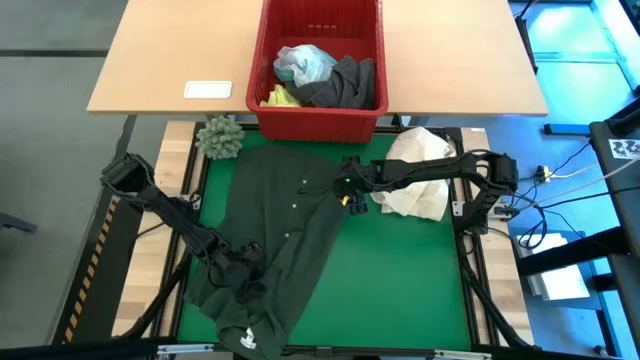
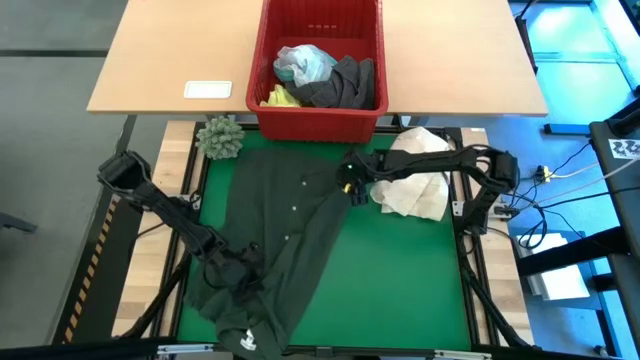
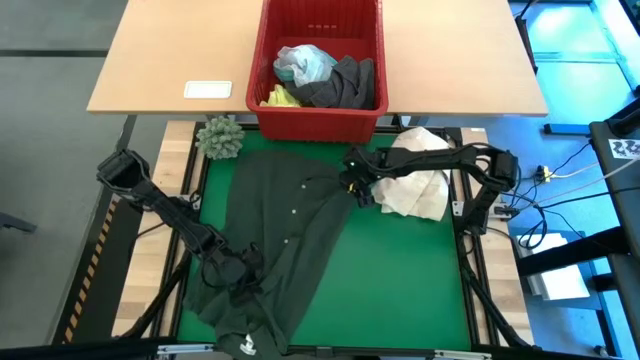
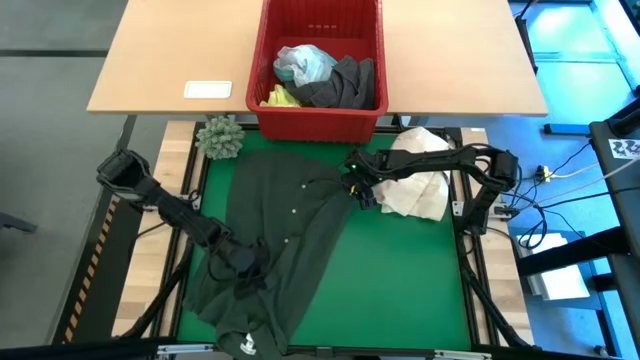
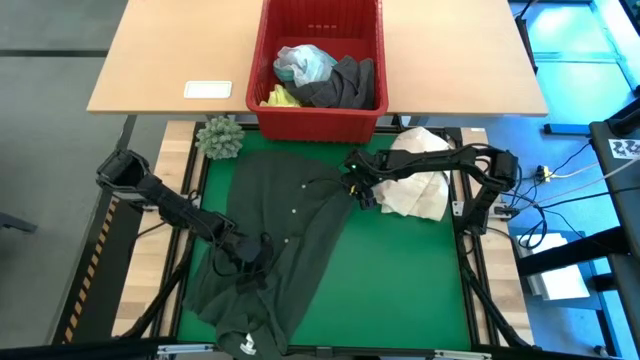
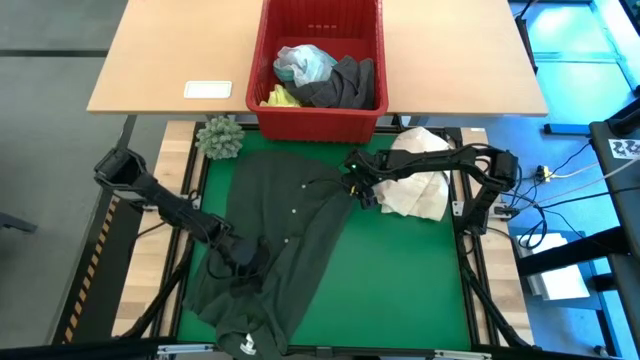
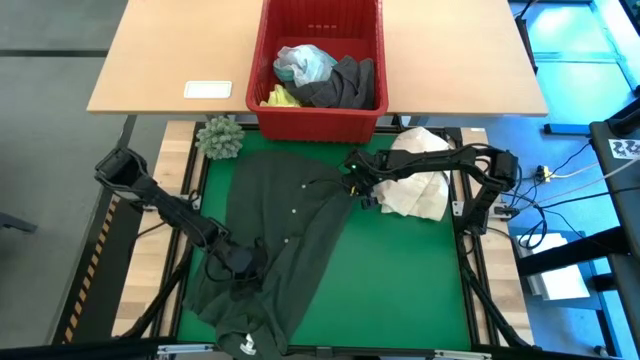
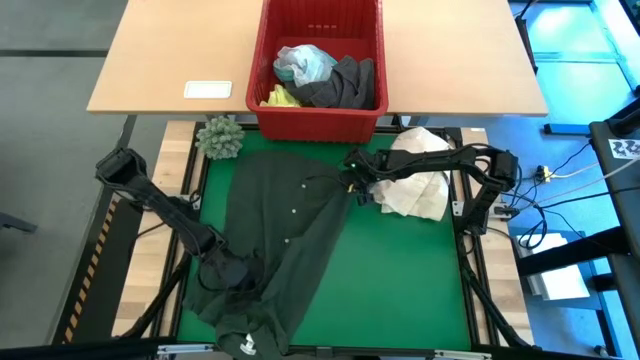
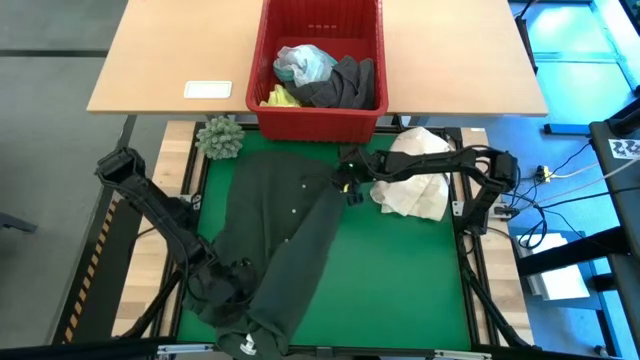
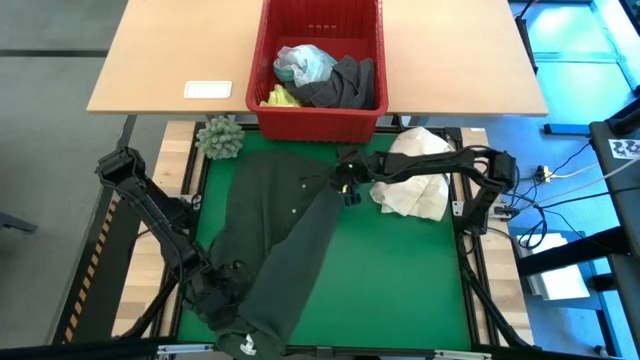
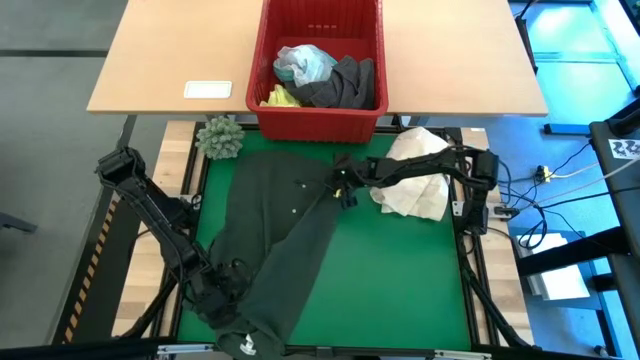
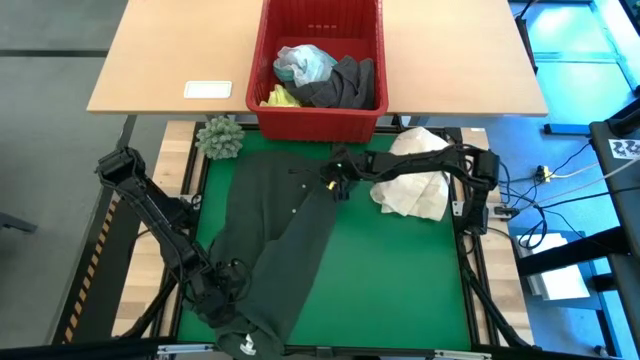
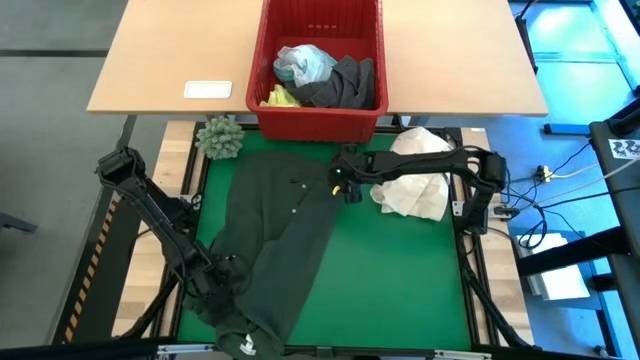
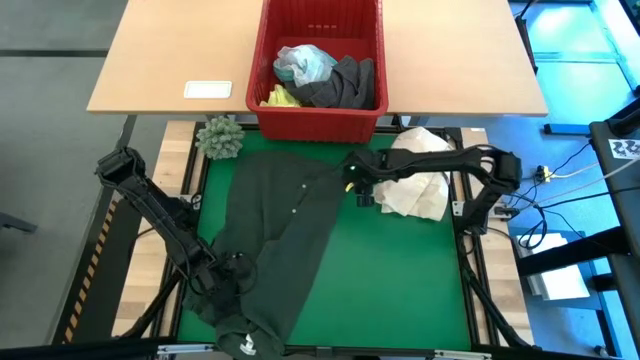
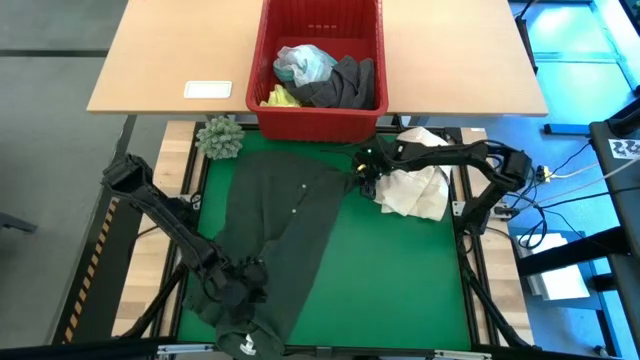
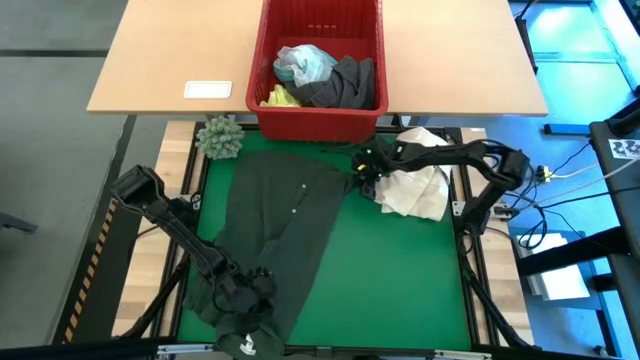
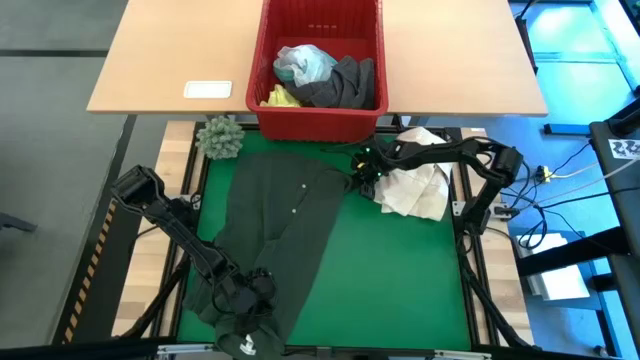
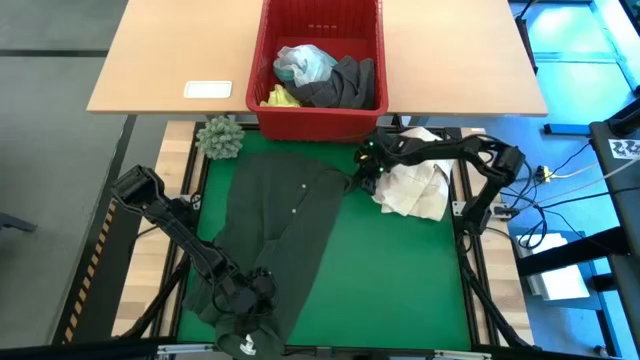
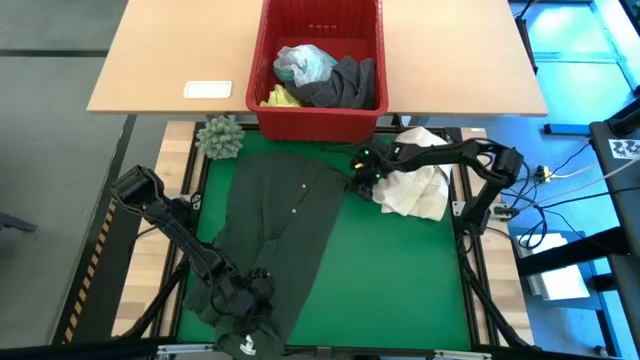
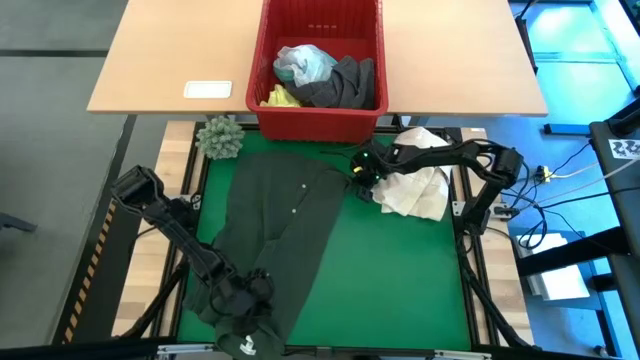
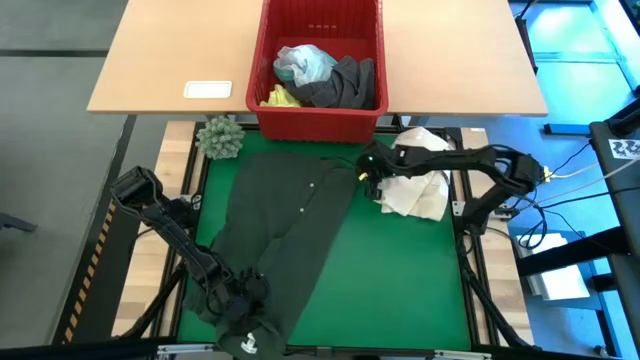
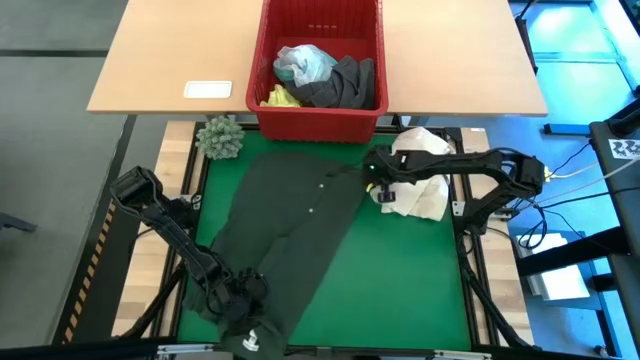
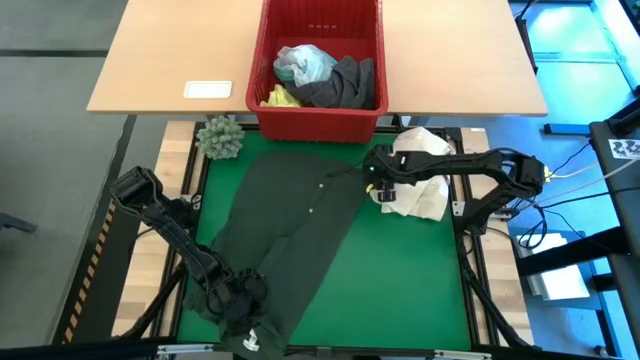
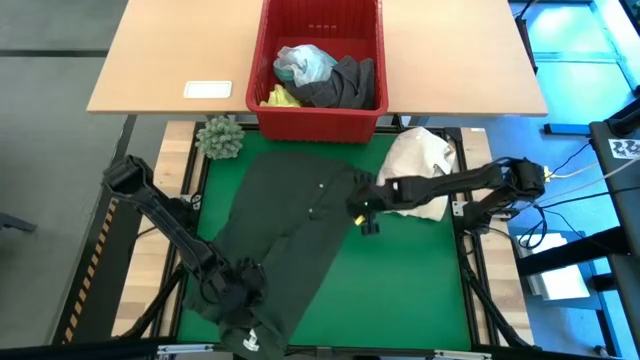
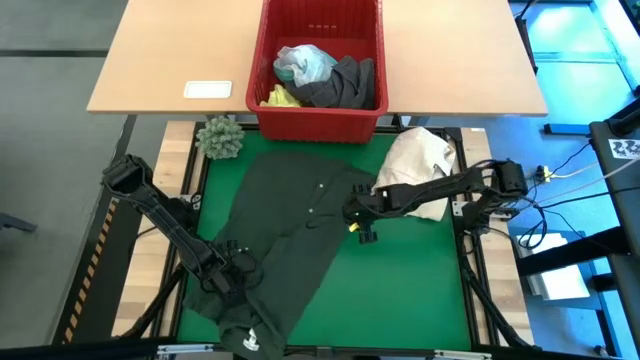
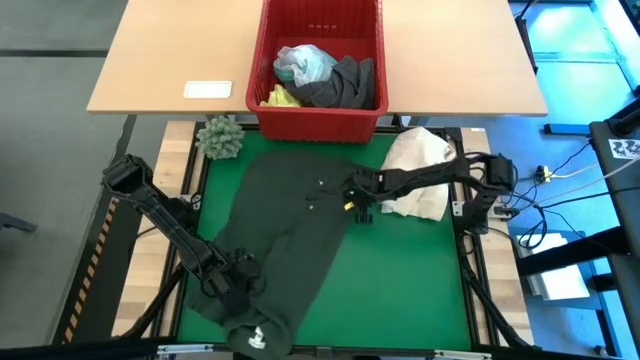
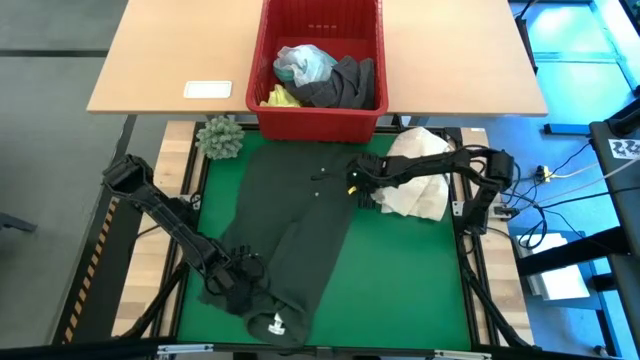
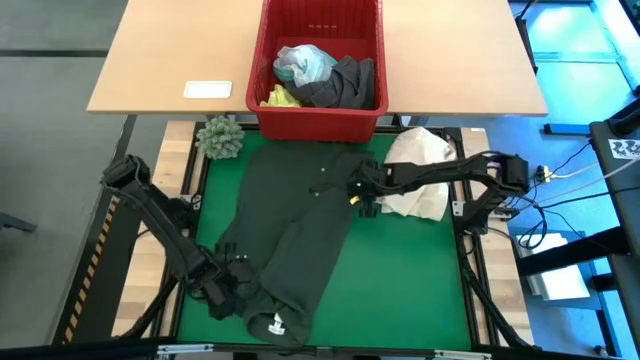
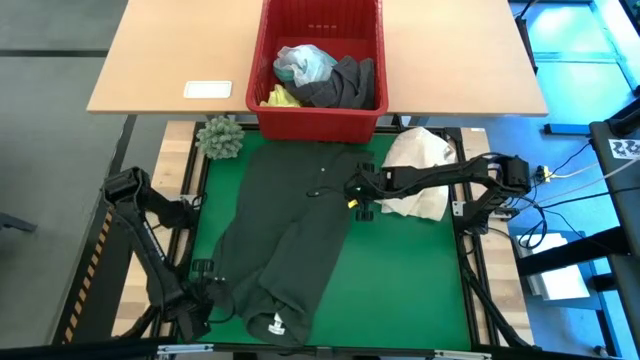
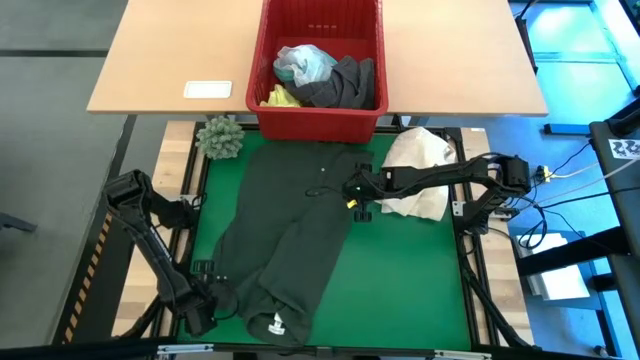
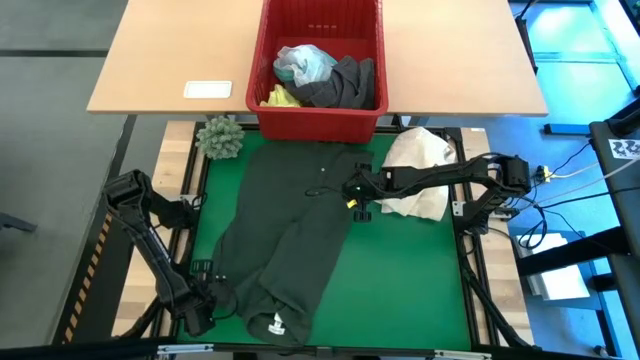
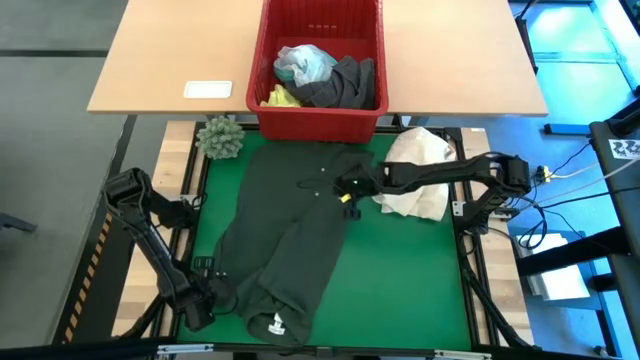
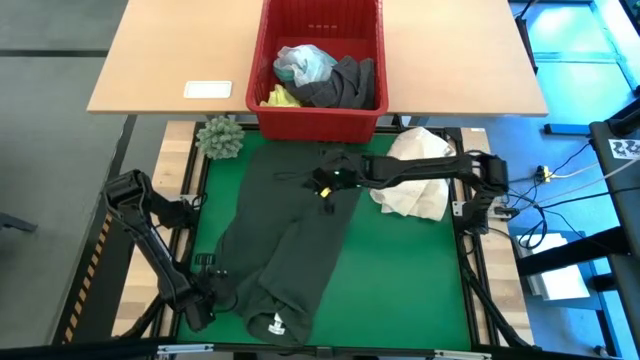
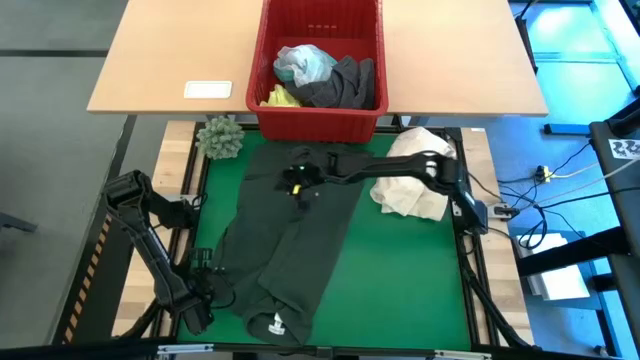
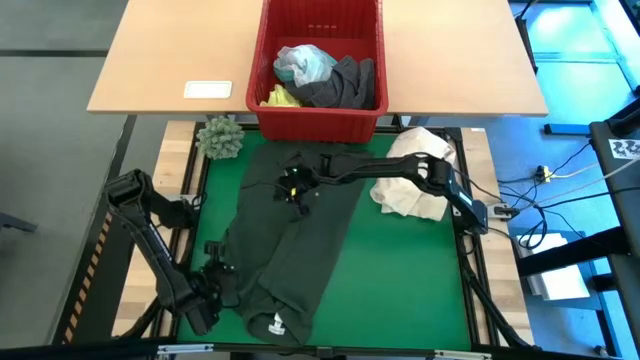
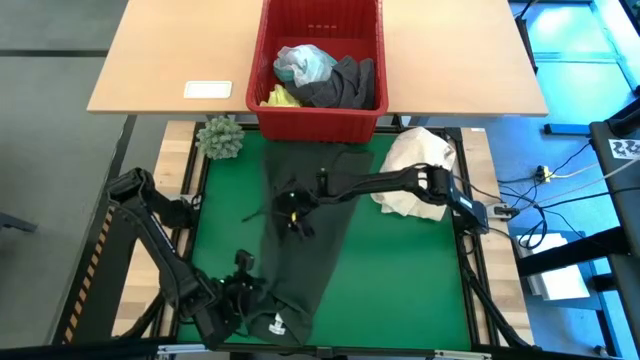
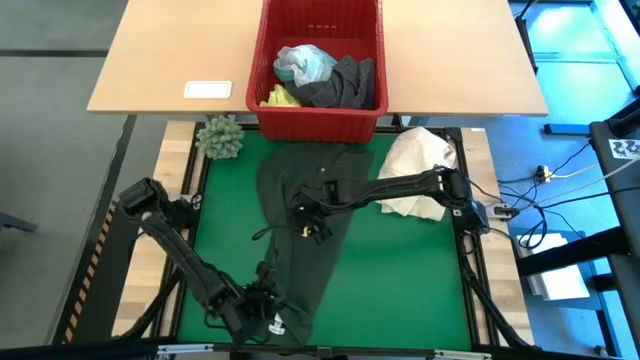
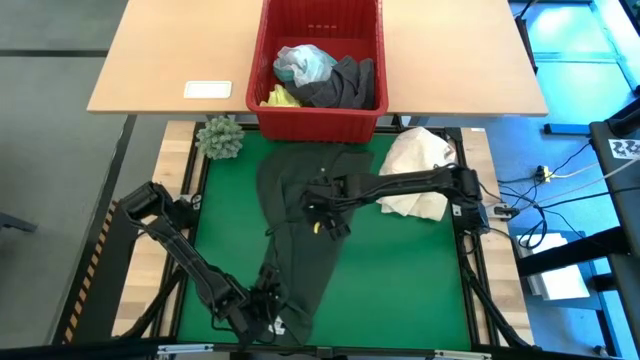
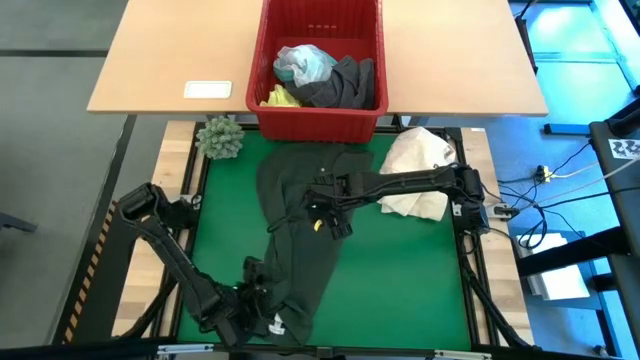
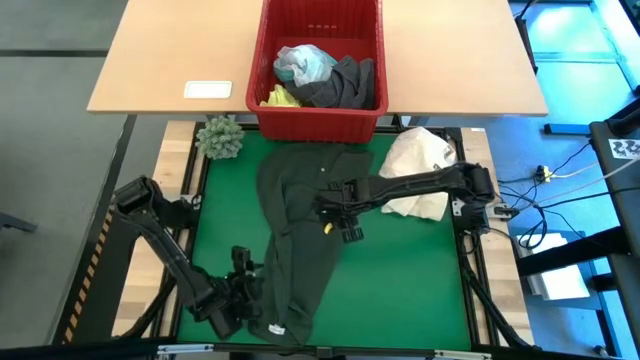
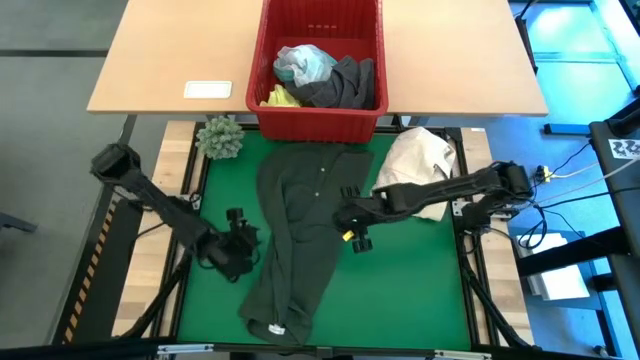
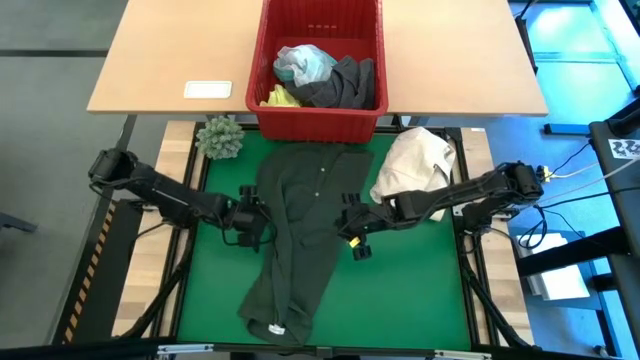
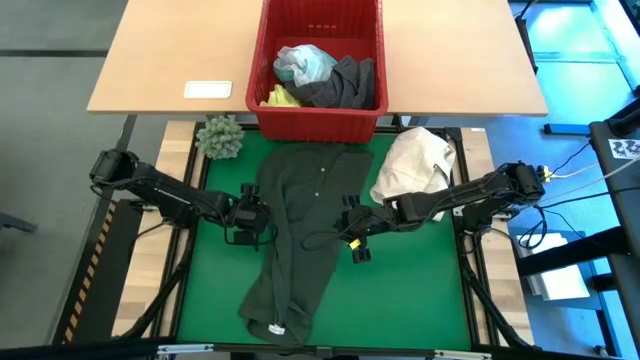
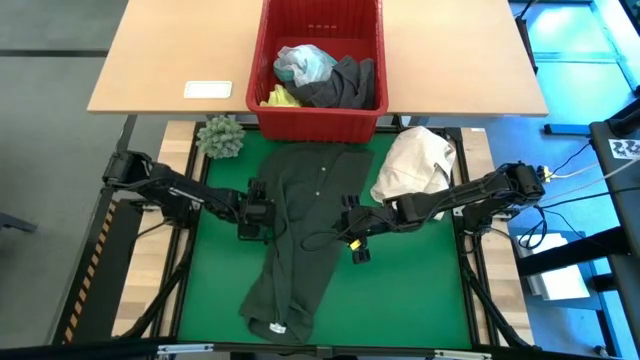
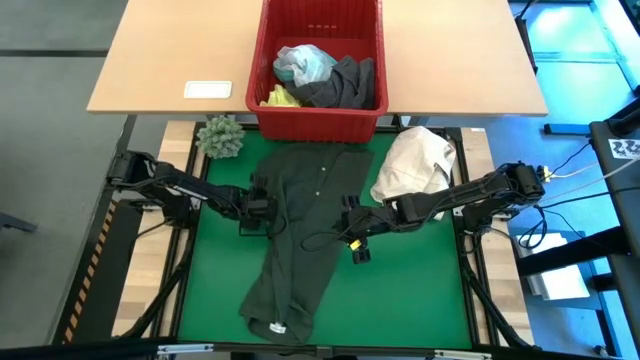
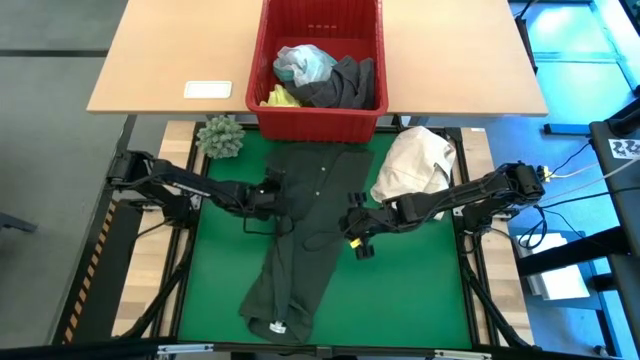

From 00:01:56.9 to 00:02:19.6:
Task: Fold Laundry from Bin
Fold the dark green polo
